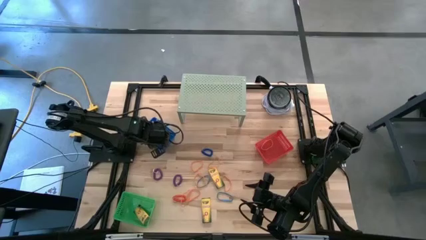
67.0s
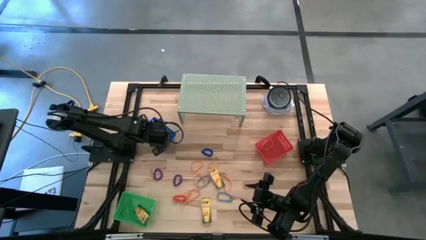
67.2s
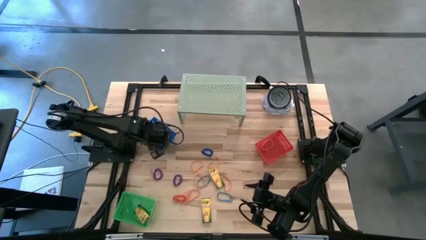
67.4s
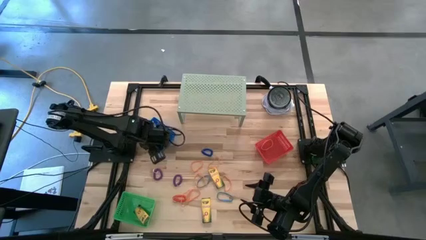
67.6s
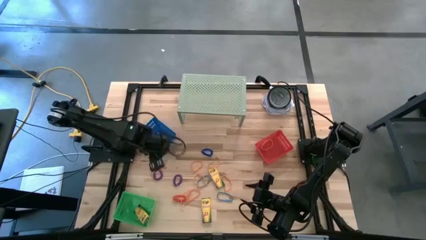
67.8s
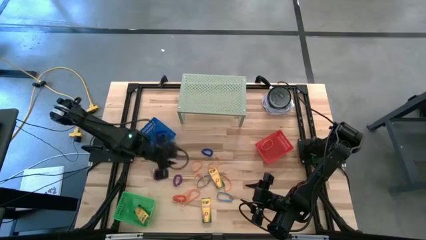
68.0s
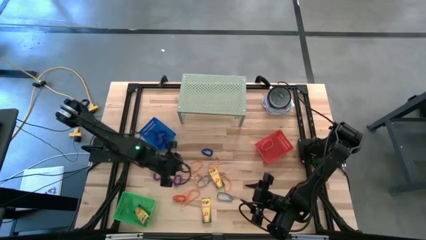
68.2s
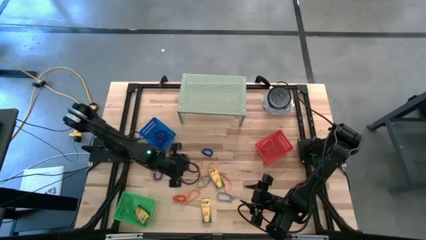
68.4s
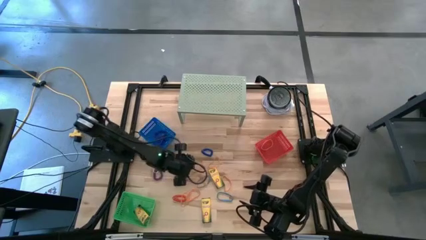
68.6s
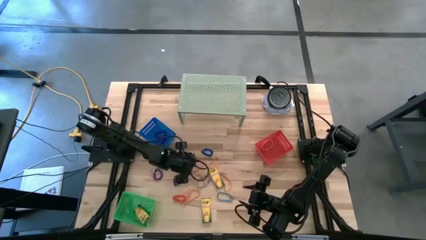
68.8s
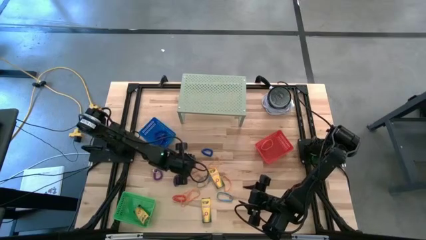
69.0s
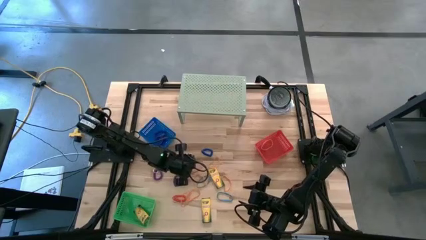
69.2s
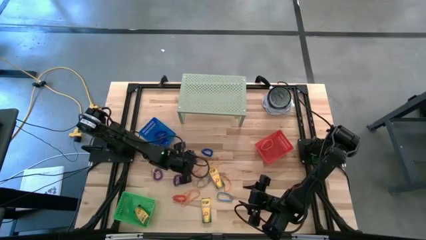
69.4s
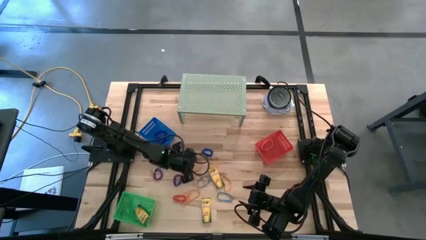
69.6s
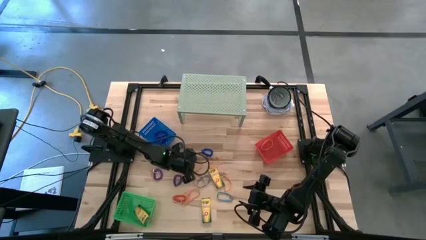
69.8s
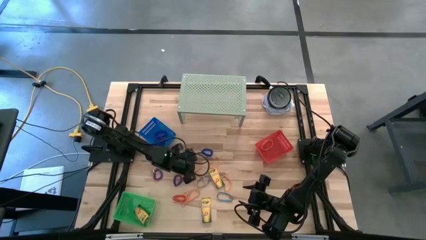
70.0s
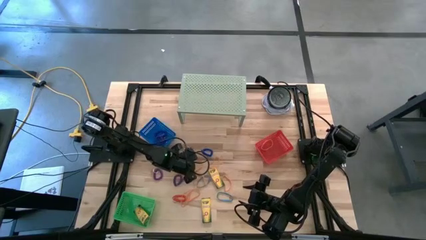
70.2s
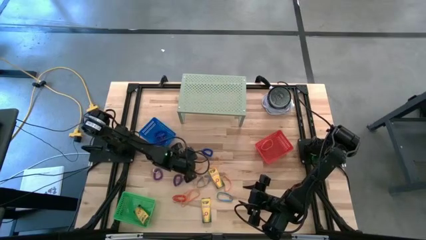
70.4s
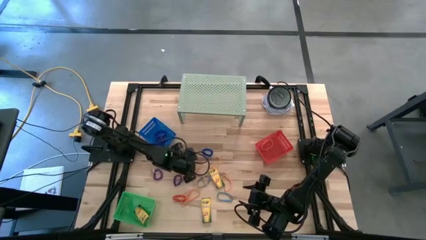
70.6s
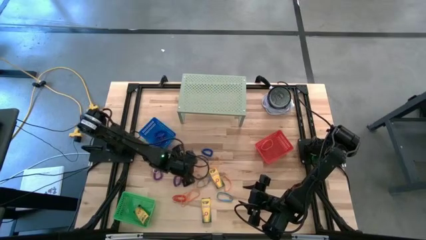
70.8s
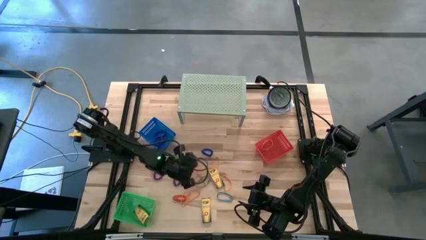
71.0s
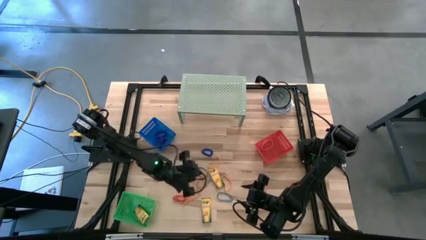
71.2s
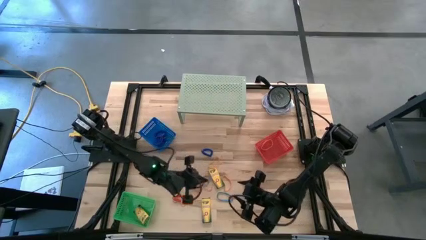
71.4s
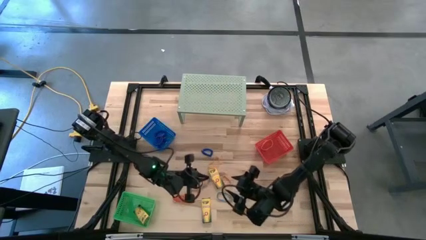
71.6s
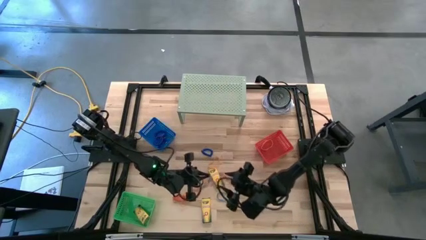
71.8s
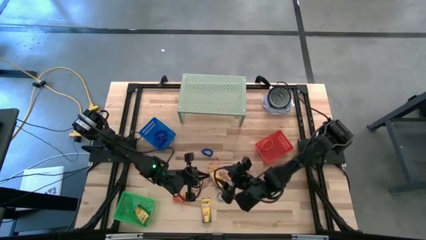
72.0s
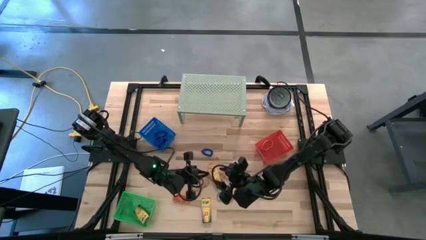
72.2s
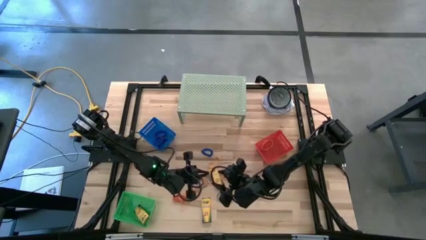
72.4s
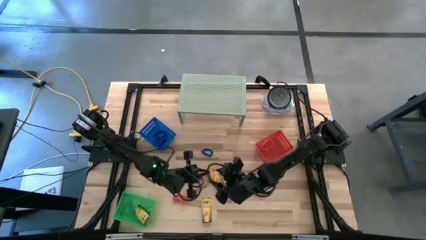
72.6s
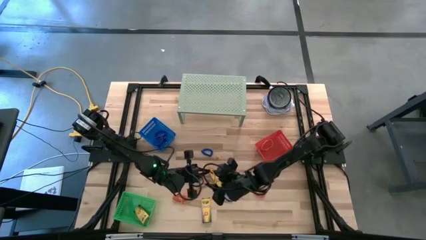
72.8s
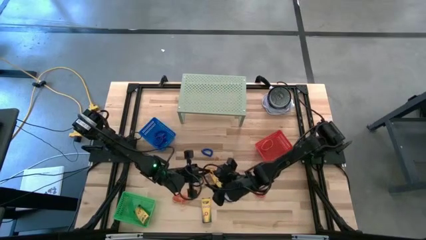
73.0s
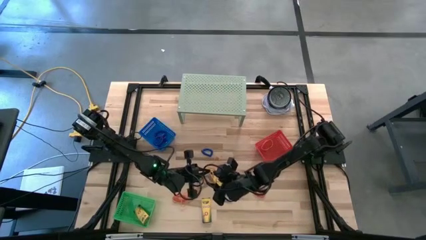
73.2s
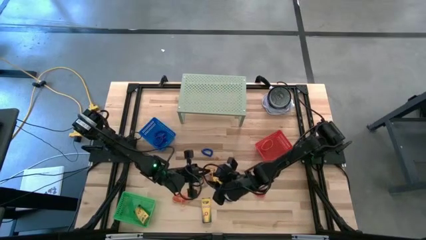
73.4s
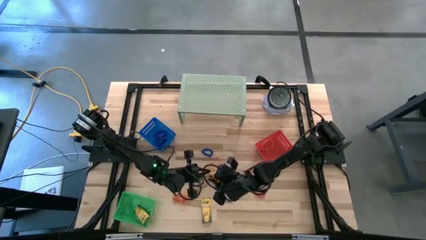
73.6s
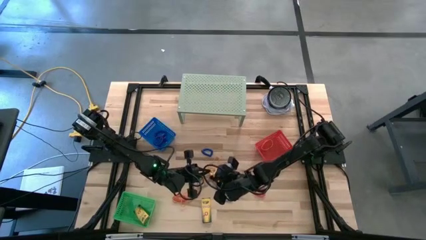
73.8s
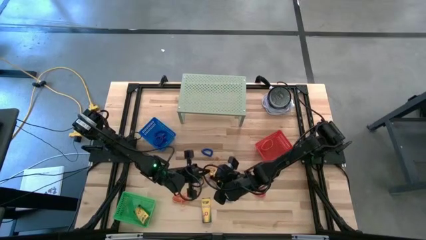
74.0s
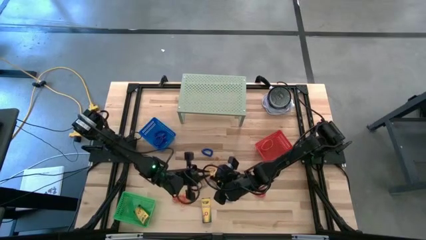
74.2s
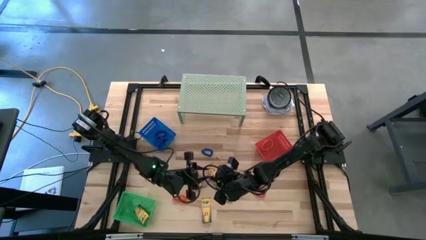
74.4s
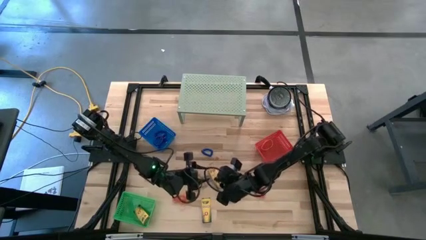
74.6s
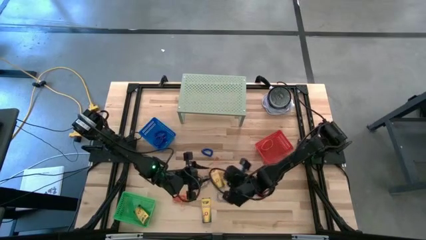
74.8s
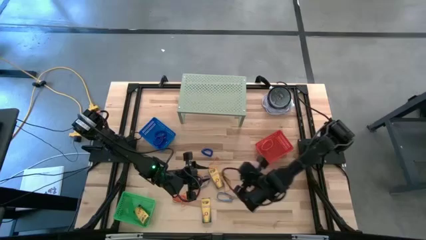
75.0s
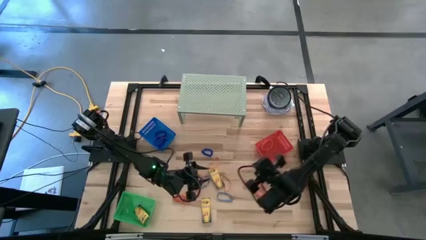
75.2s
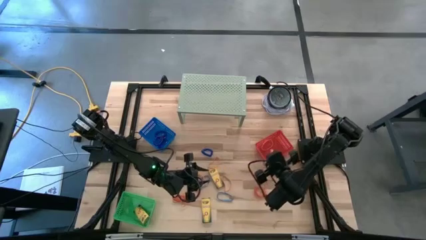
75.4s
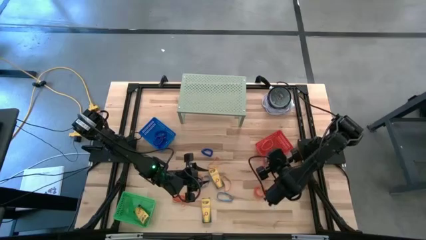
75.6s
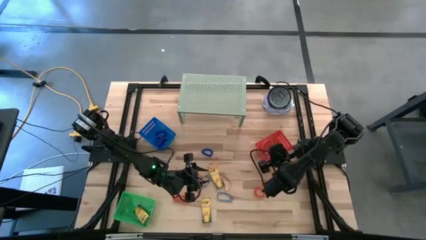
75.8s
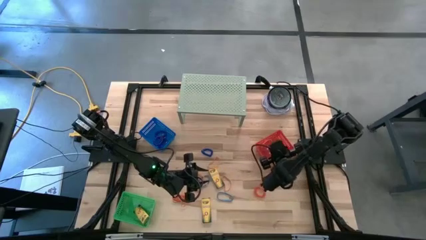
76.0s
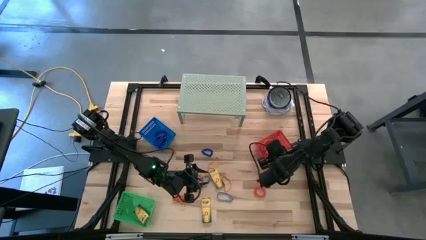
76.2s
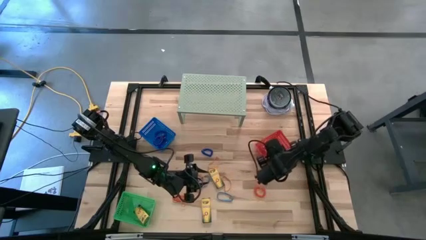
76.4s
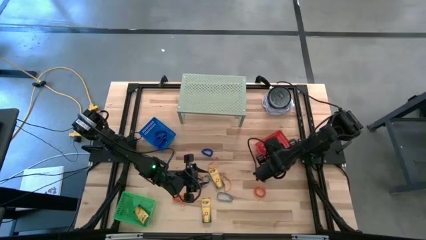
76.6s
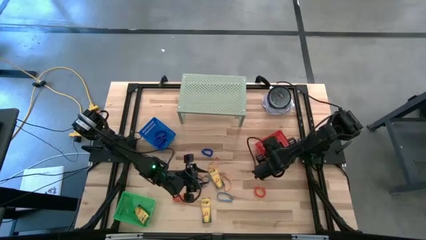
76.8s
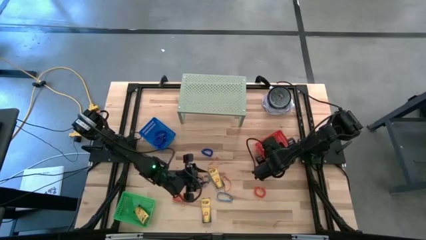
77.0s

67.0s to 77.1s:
Task: Pick & Place Office Desk Supplies
Put the orange rubber band into the red bin

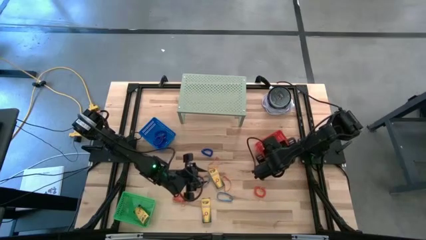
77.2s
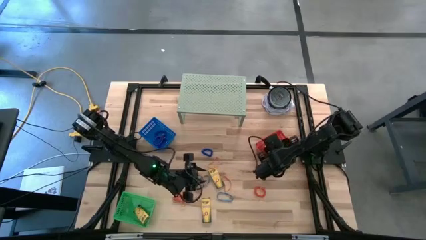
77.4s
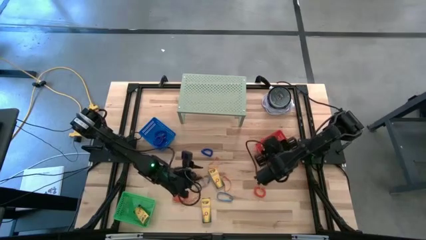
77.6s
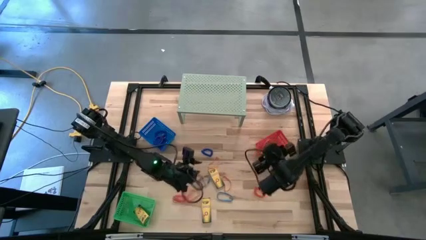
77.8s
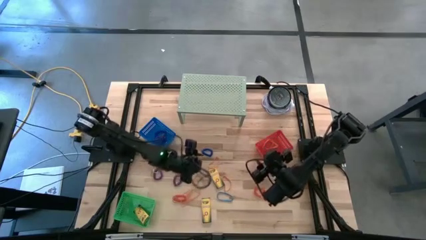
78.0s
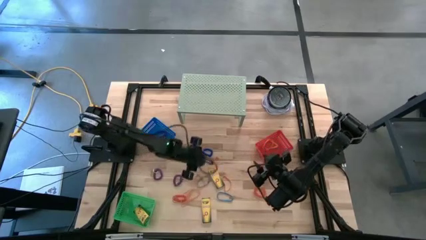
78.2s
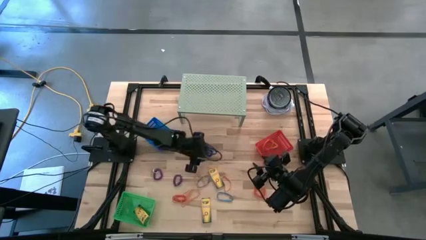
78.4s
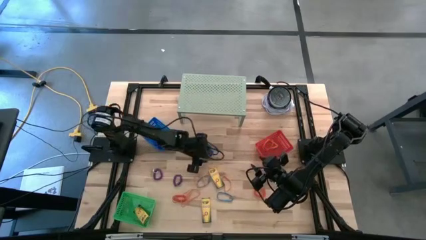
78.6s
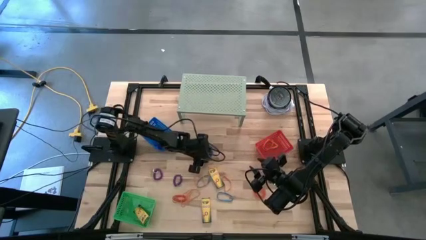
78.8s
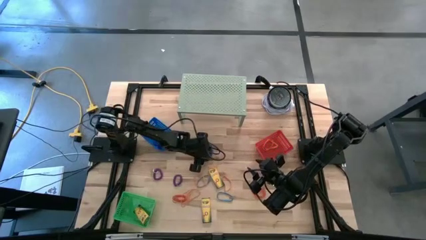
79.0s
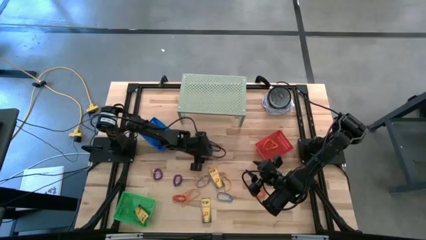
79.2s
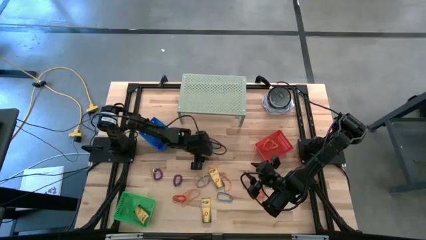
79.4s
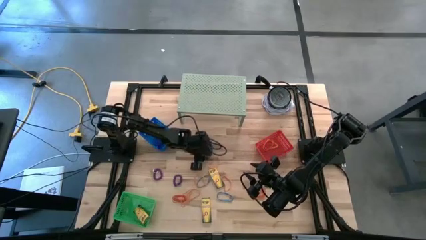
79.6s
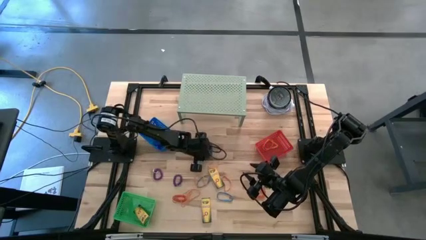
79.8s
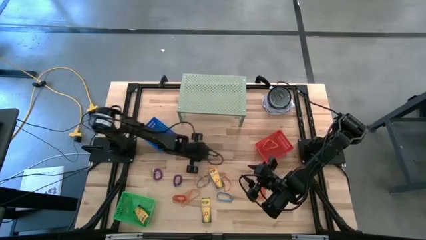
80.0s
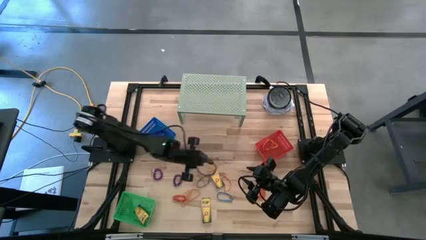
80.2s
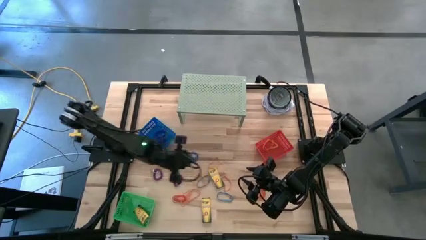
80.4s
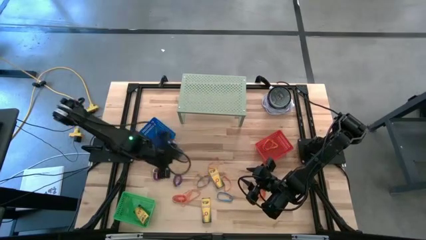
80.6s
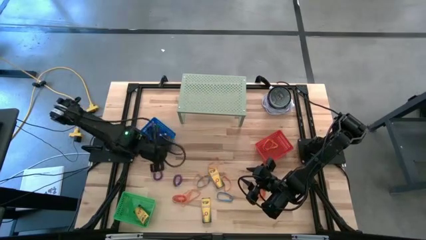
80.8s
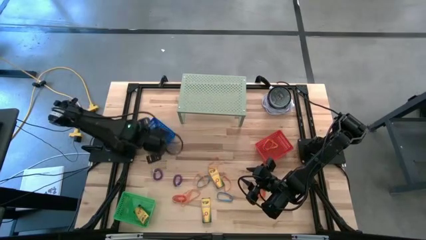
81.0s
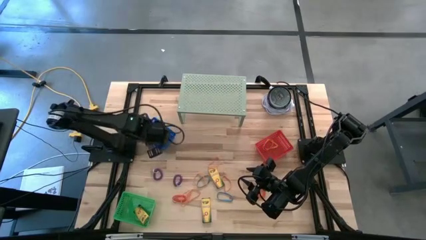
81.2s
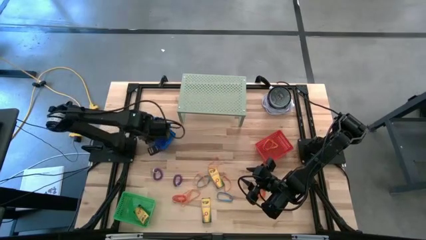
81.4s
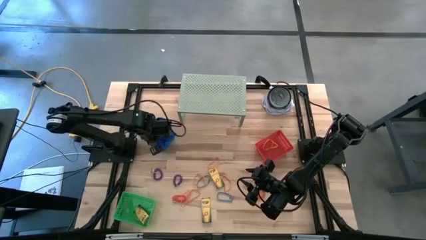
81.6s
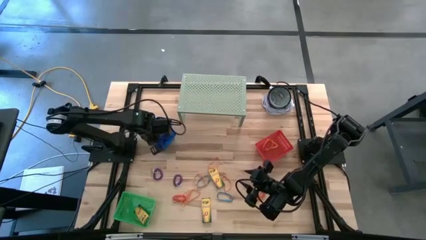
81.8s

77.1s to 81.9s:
Put the blue spring keychain into the blue bin

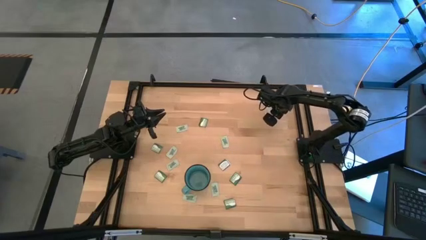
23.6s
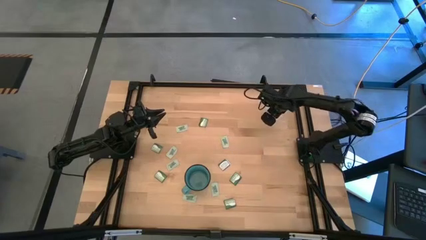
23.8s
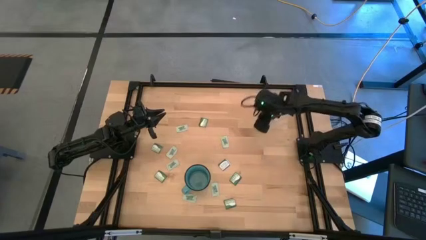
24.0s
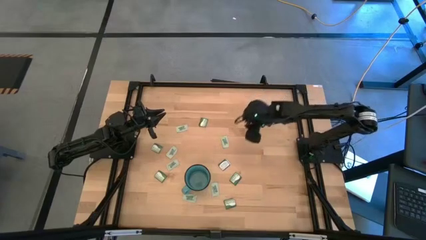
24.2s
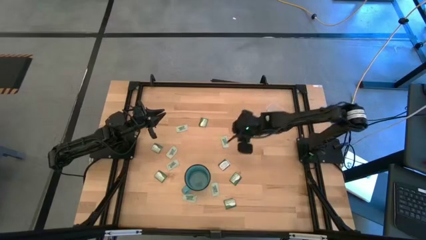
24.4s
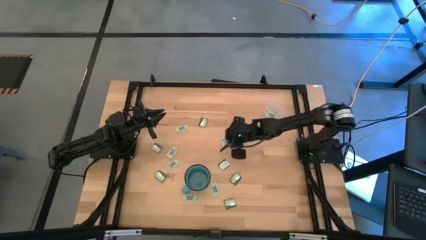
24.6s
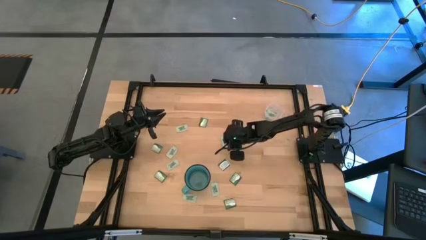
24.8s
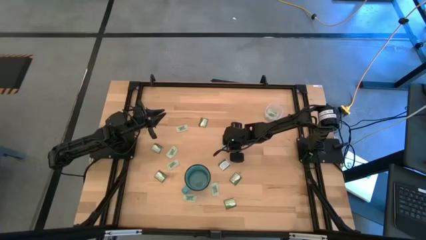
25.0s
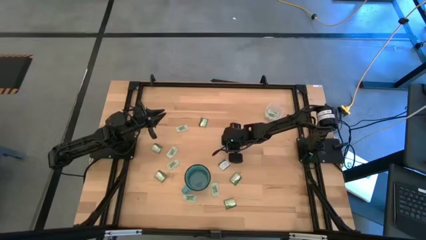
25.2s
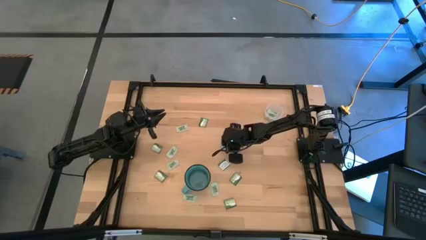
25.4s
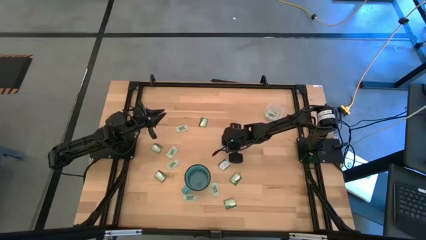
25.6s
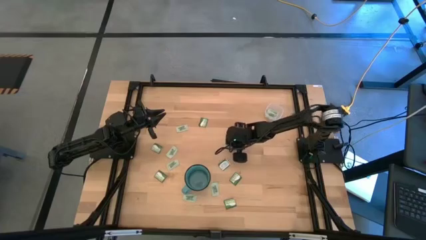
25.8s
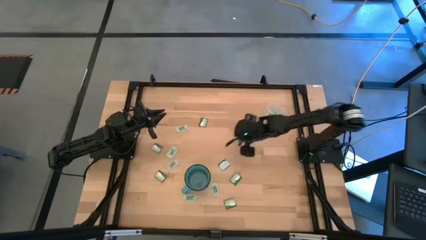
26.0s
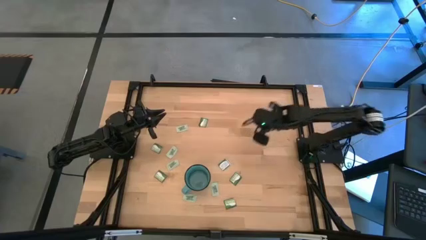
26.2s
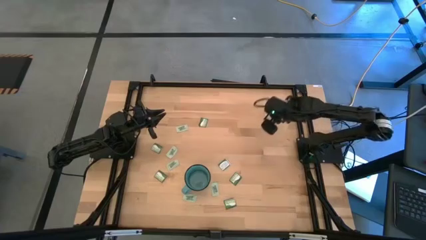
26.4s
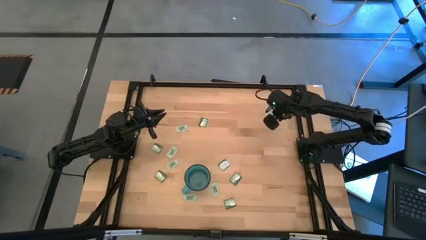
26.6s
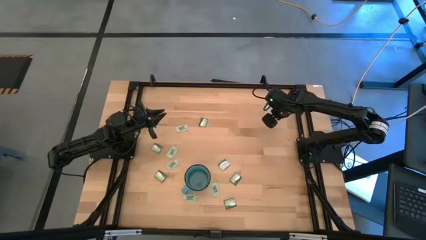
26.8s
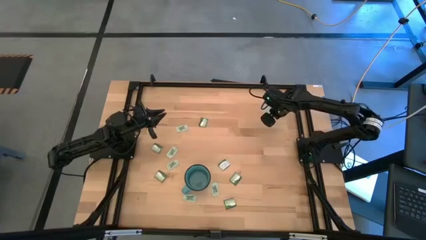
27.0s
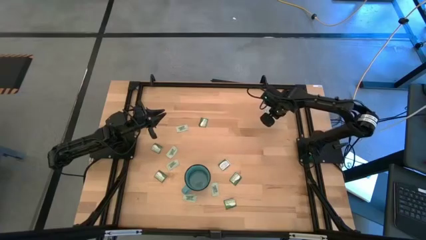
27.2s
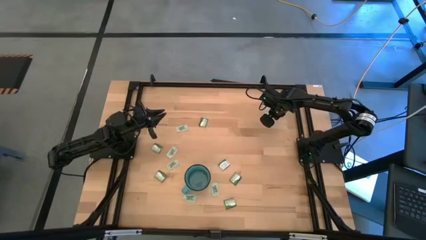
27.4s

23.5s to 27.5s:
Task: Pick and place items into bin
Put the stevia packet into the transparent bin
